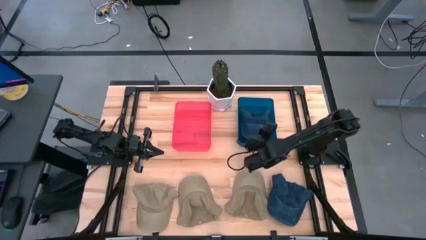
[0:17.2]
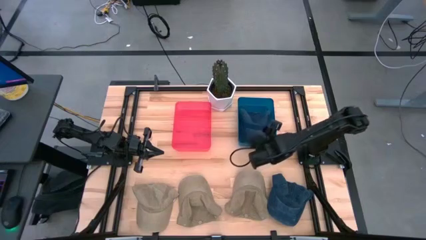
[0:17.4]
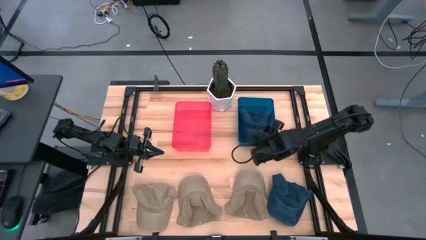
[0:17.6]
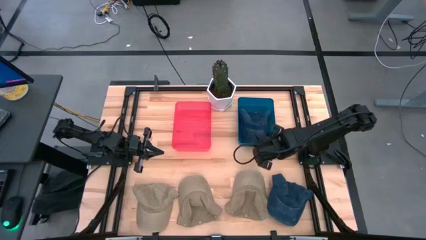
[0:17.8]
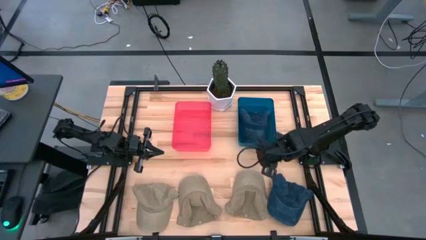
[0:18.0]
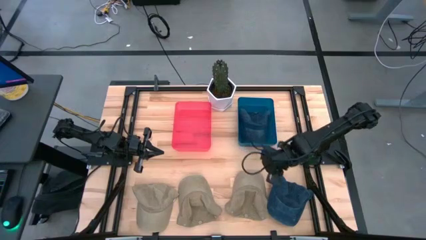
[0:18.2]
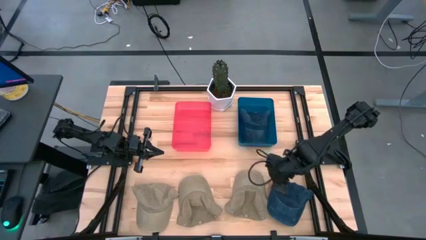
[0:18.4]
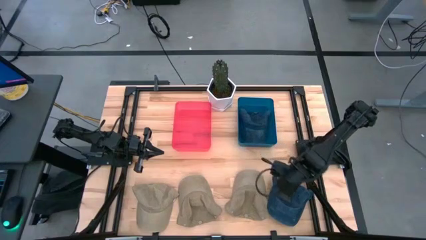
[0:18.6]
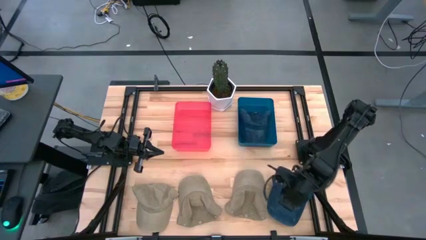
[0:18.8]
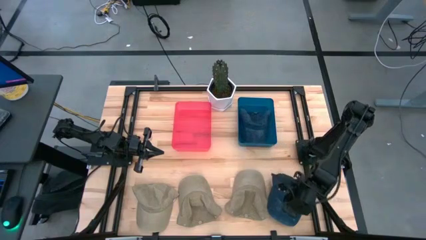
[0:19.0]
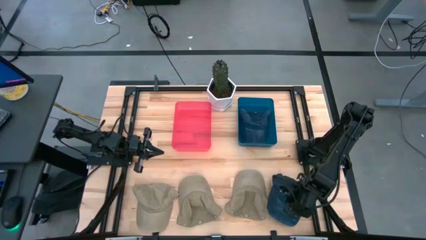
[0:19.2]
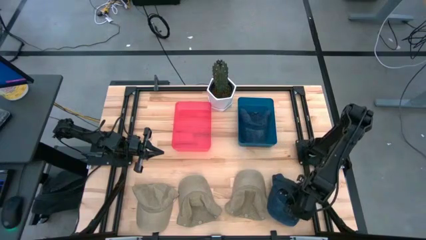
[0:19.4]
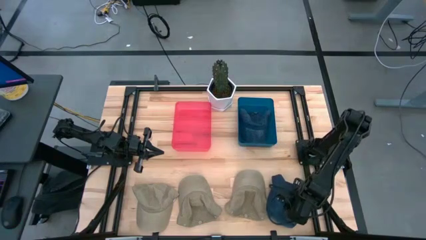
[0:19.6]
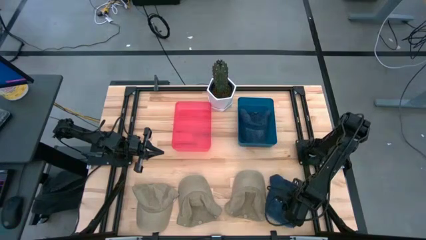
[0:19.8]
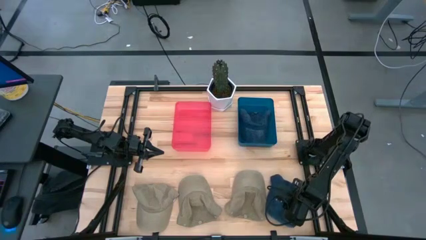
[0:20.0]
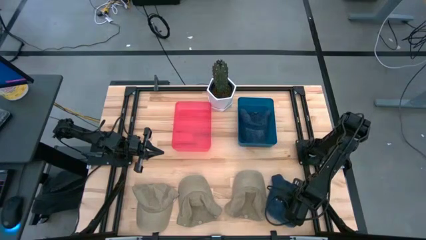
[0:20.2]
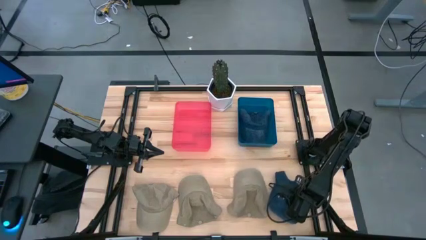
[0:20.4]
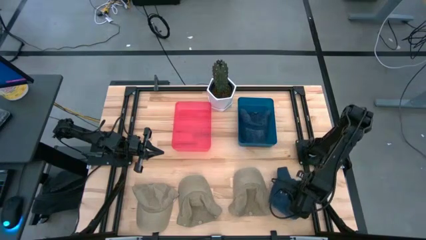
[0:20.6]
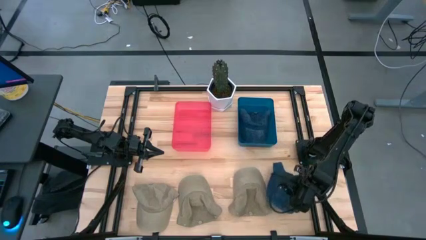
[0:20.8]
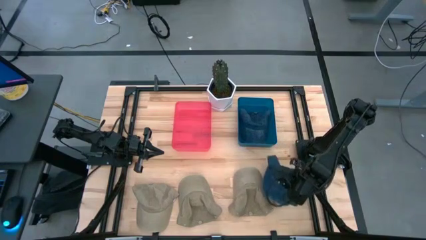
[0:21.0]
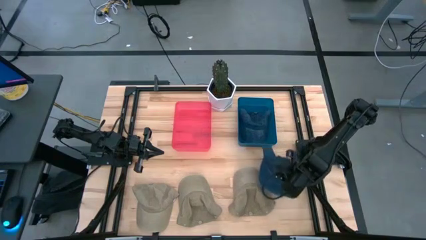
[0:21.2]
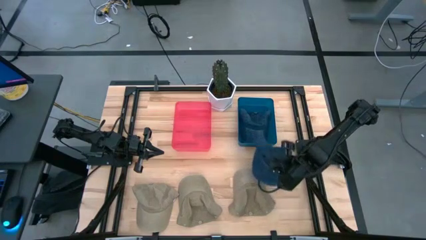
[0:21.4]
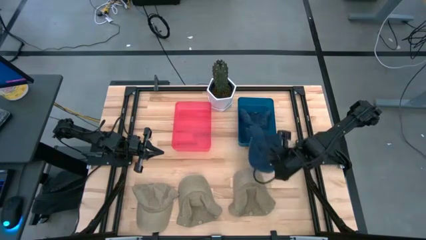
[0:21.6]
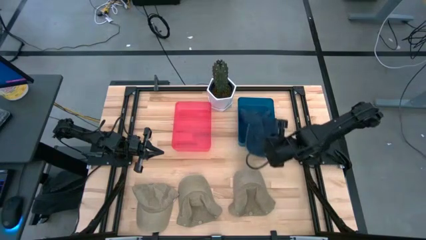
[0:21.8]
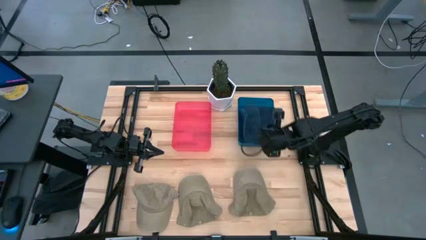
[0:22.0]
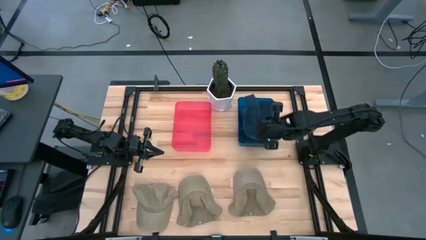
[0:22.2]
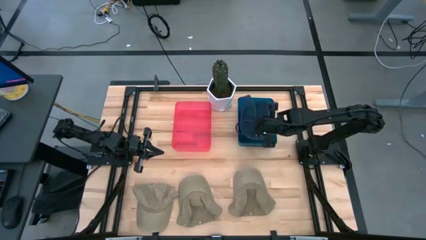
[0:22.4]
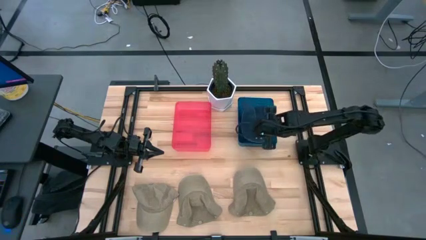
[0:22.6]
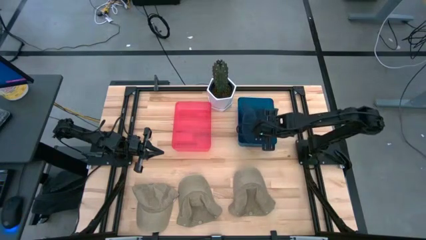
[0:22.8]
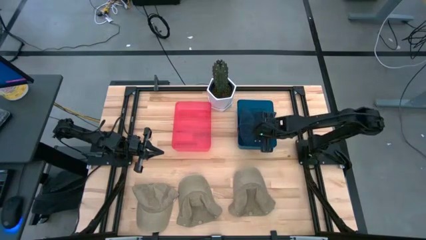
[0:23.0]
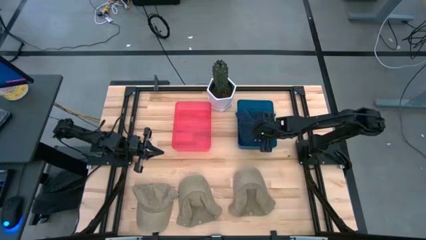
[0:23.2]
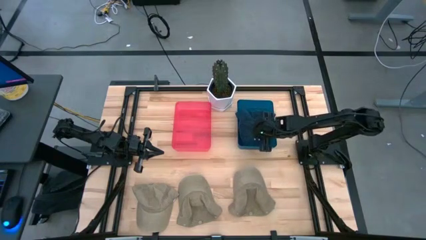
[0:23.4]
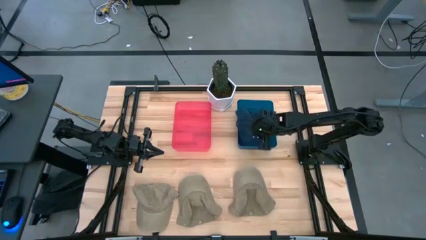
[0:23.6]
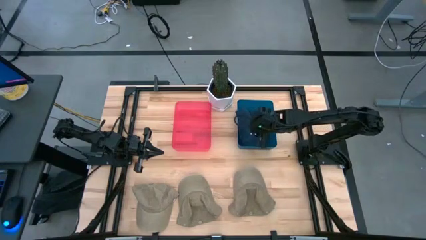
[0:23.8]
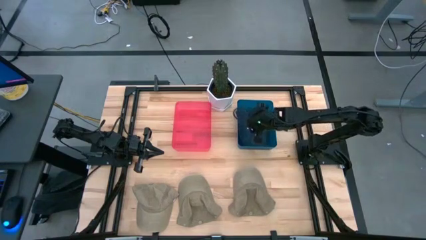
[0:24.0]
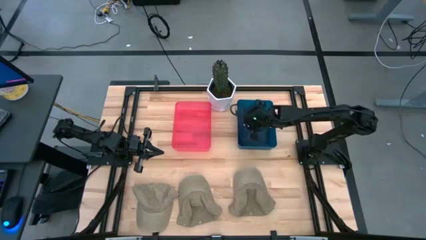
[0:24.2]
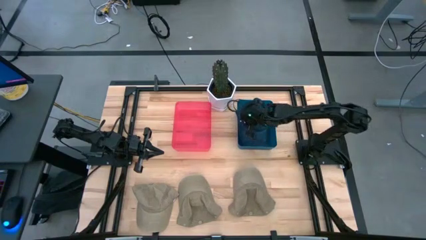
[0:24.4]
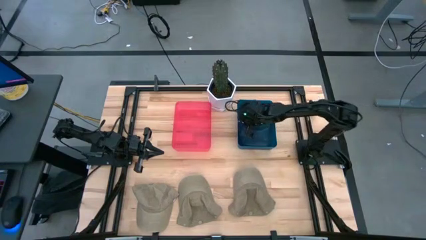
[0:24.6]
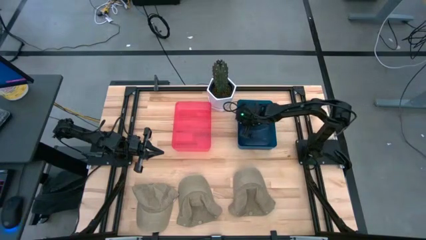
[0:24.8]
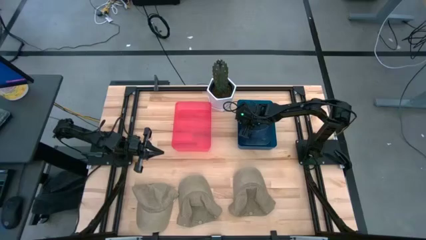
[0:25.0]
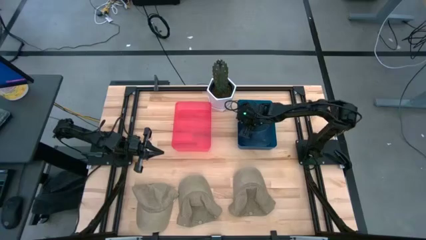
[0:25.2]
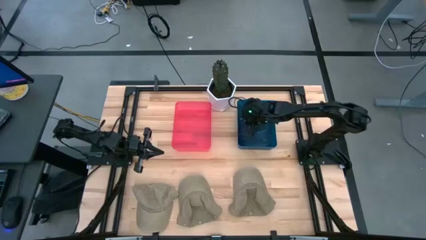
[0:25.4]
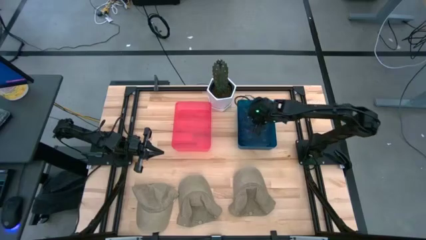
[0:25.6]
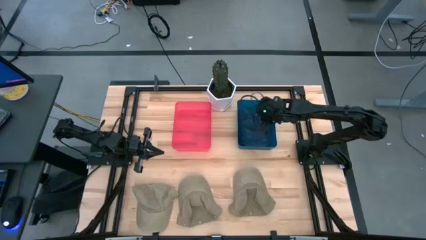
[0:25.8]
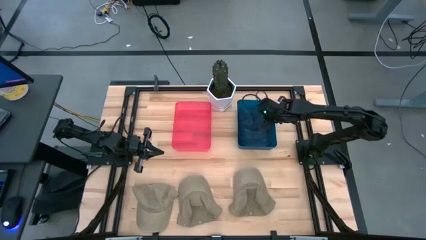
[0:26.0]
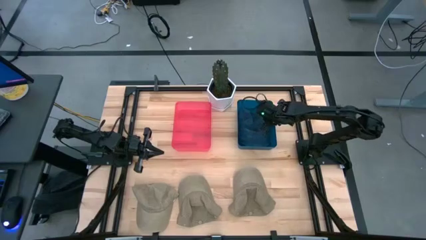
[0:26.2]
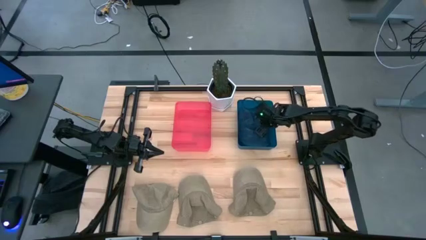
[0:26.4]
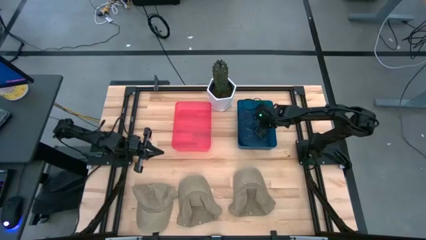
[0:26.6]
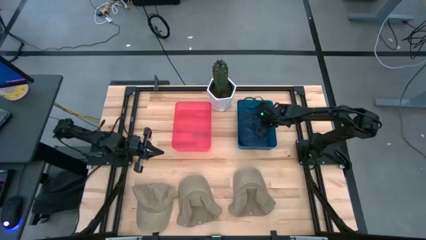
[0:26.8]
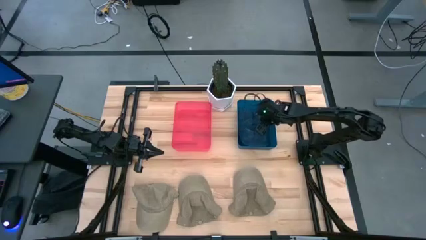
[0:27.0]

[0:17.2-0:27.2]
Task: Pick & Place hat
Put the blue cap into the blue bin

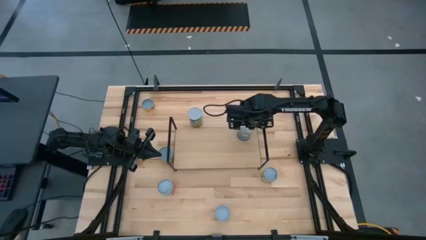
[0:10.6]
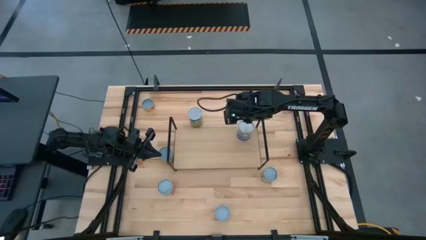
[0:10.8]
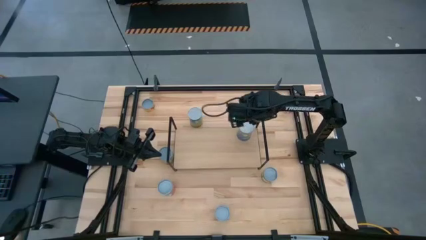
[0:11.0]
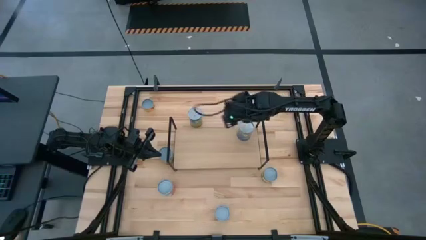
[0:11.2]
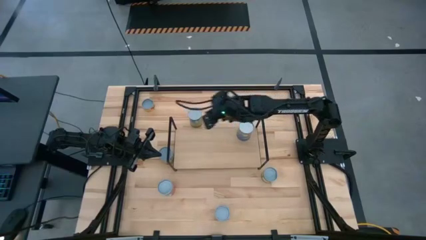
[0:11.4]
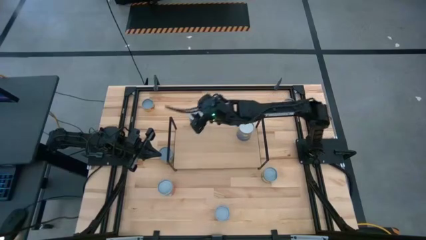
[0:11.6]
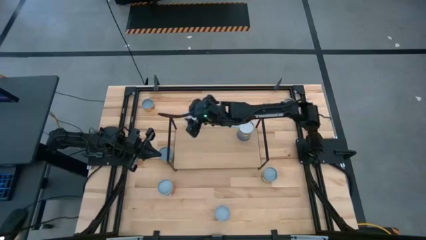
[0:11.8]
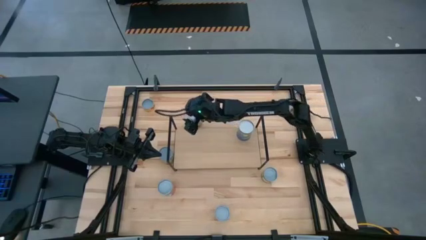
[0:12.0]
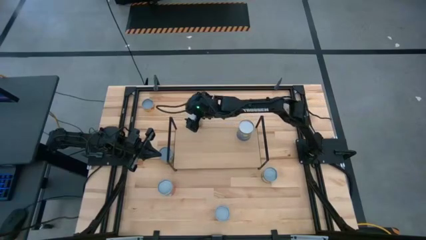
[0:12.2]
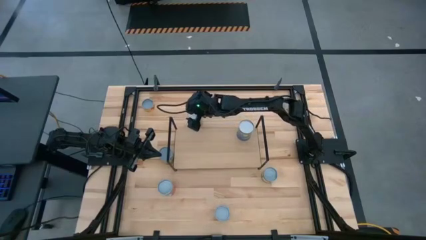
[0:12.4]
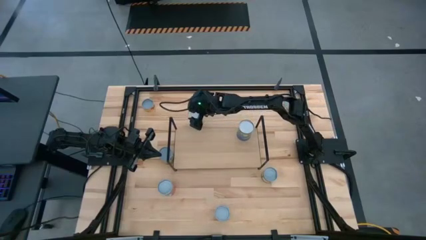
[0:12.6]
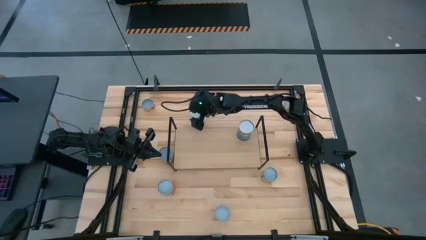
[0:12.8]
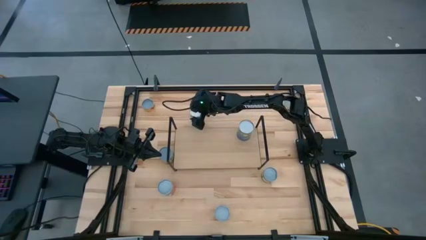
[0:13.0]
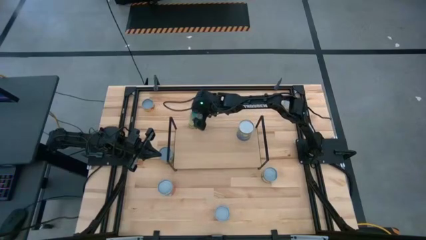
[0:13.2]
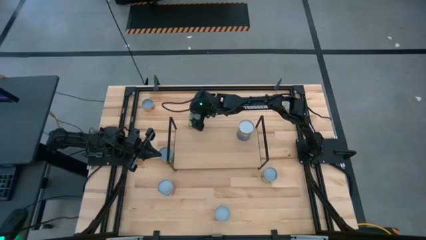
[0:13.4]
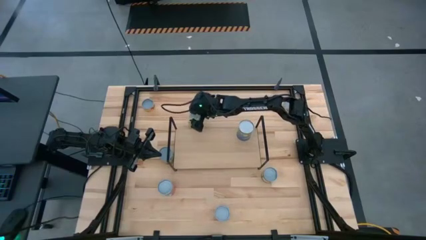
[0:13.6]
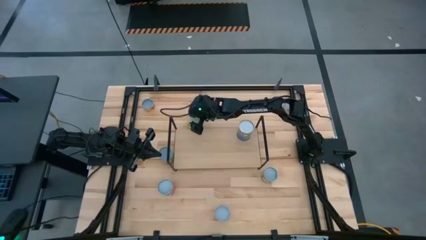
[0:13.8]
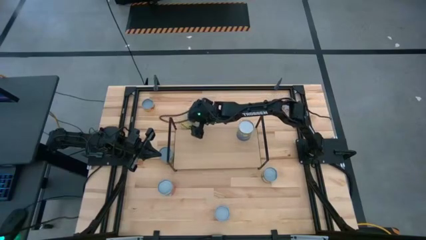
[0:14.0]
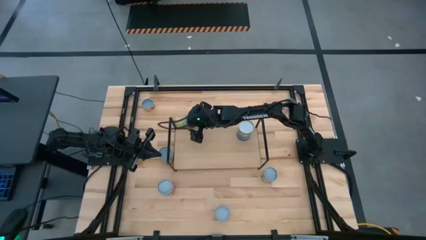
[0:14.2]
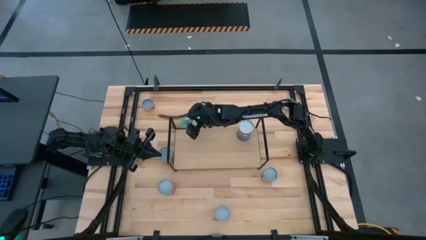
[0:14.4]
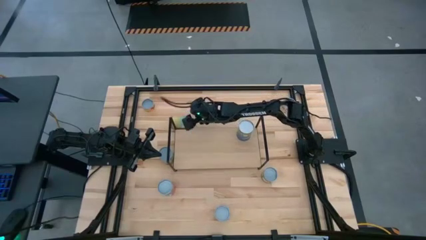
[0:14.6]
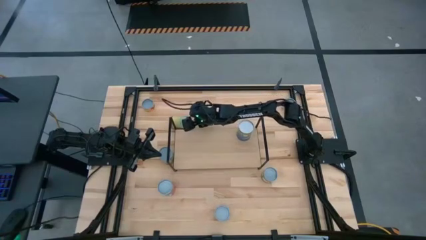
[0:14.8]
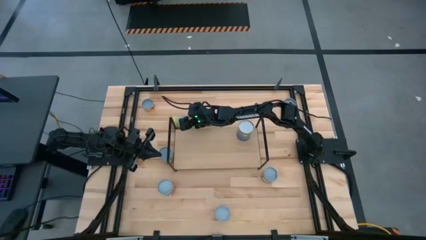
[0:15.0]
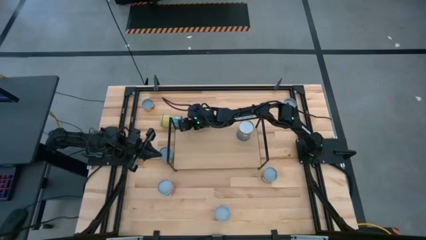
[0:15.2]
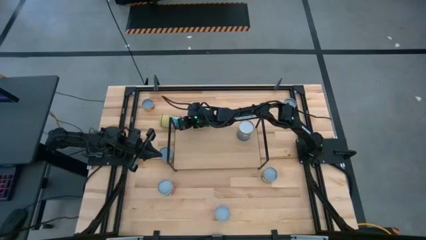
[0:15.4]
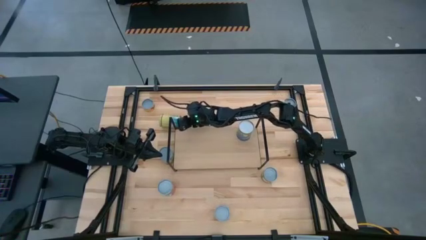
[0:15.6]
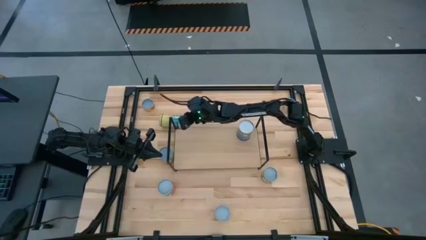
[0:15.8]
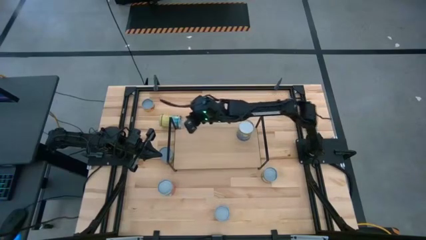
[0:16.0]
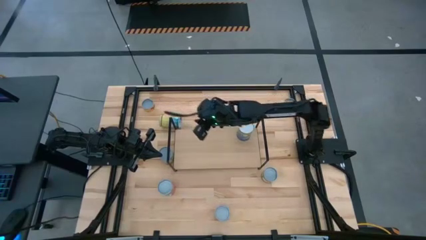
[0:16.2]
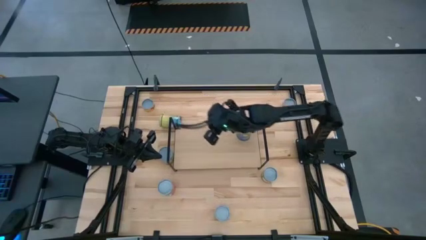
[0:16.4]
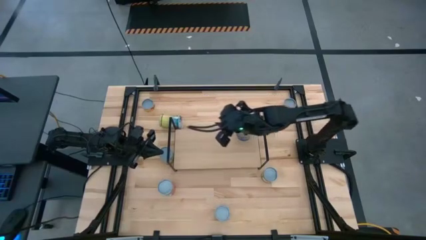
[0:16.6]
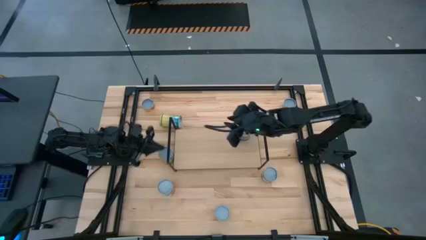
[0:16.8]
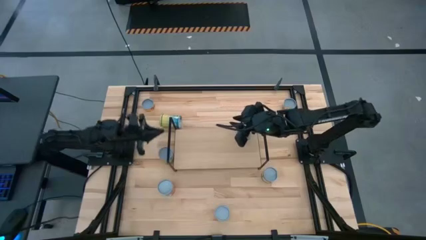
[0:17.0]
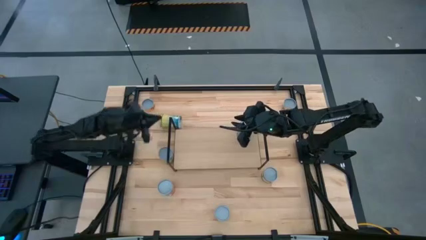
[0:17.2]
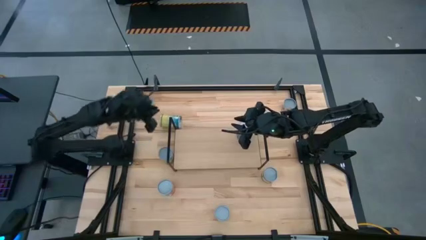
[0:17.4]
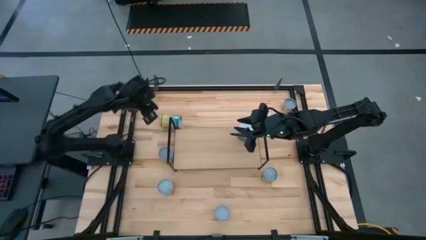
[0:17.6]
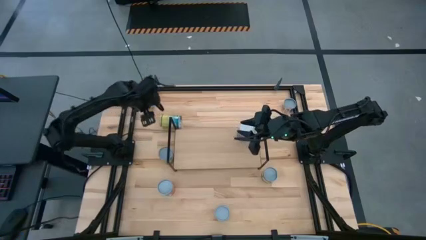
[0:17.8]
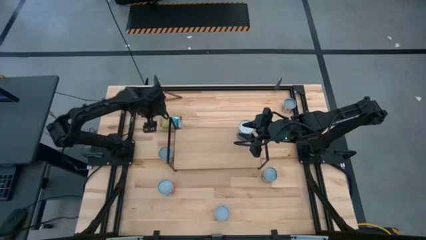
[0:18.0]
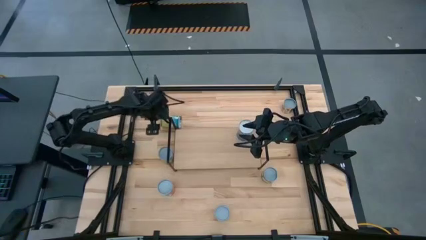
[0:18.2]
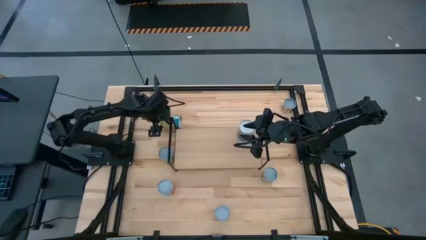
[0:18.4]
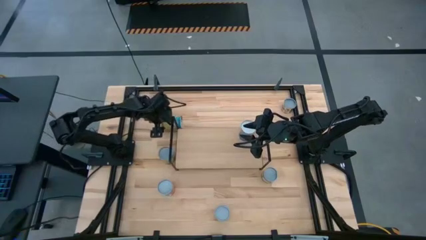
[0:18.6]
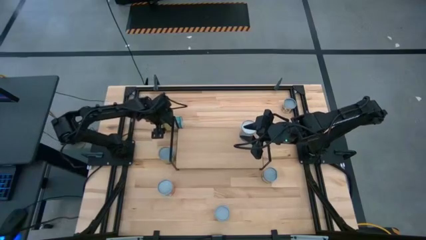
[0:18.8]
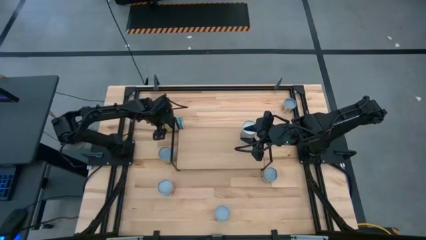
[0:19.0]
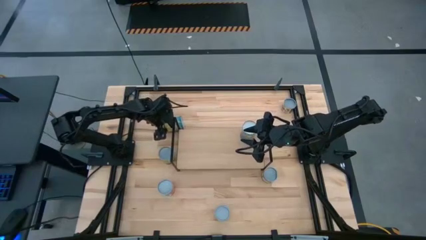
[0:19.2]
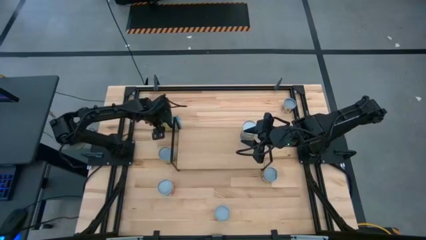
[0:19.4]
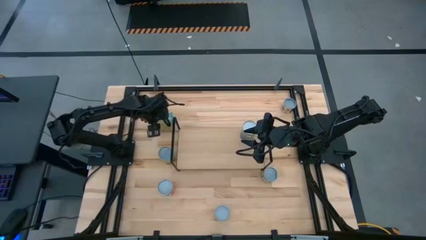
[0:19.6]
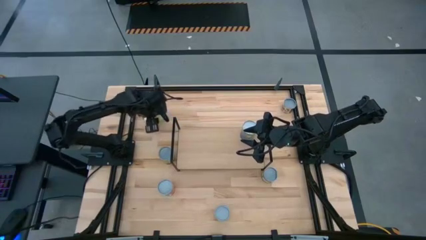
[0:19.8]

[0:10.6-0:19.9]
Task: Pick and place cans onto a shelf
Put the canned carrots on the shelf
